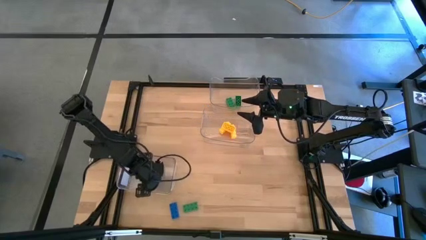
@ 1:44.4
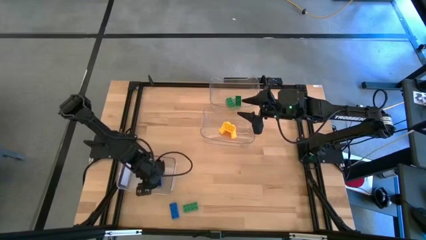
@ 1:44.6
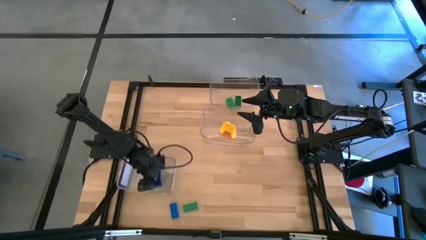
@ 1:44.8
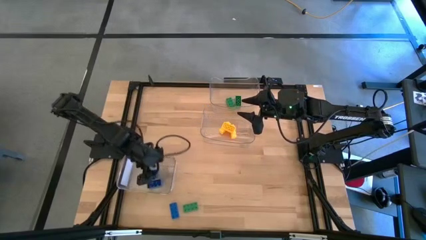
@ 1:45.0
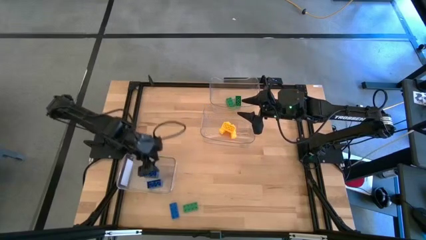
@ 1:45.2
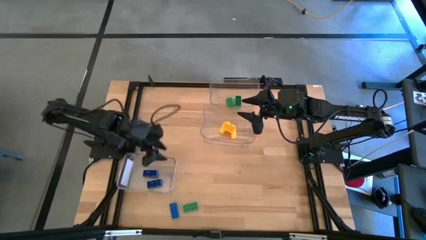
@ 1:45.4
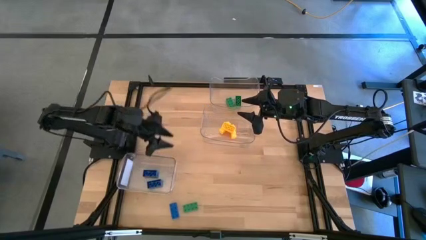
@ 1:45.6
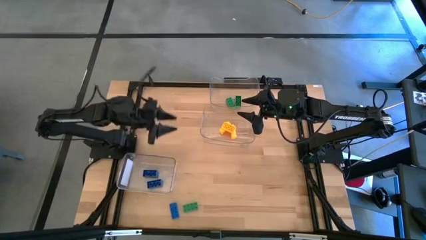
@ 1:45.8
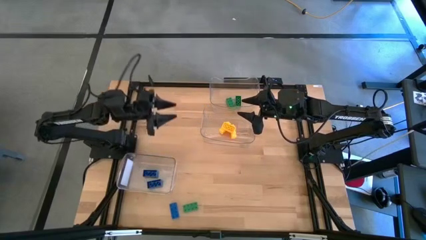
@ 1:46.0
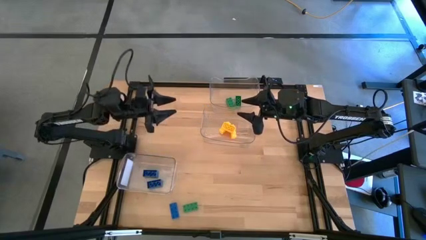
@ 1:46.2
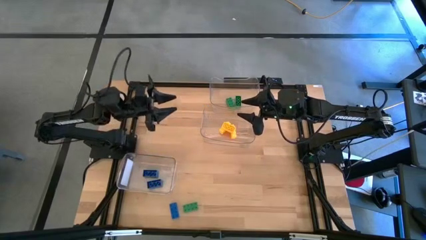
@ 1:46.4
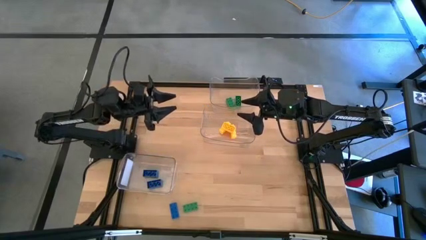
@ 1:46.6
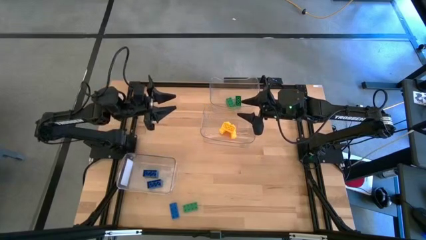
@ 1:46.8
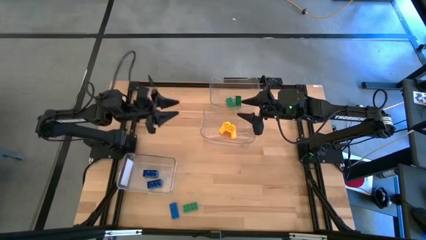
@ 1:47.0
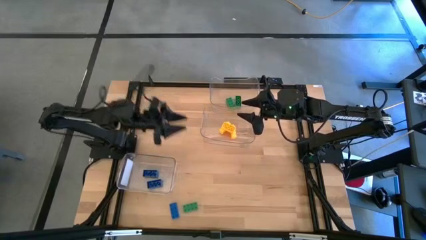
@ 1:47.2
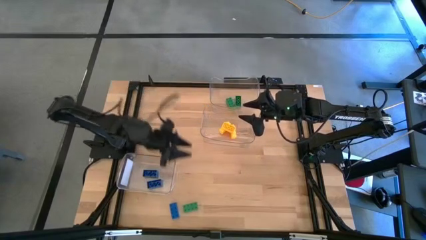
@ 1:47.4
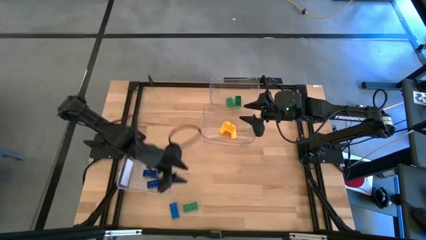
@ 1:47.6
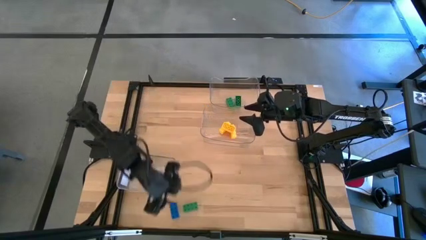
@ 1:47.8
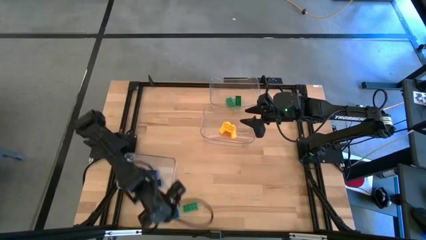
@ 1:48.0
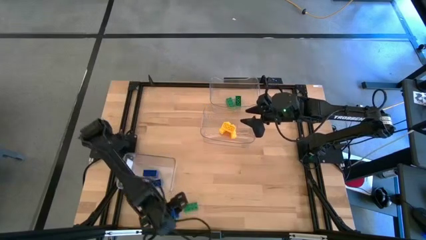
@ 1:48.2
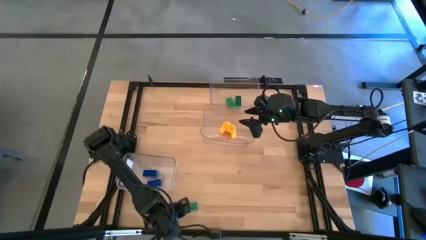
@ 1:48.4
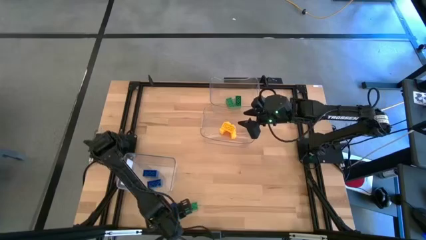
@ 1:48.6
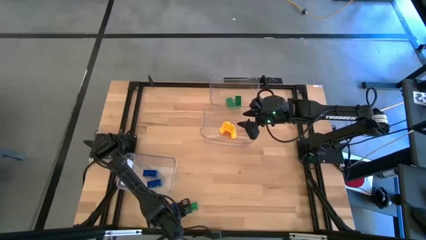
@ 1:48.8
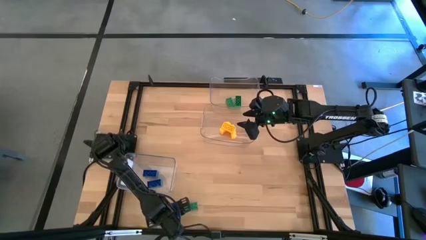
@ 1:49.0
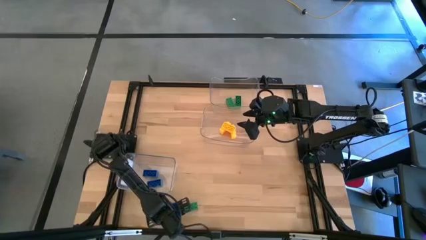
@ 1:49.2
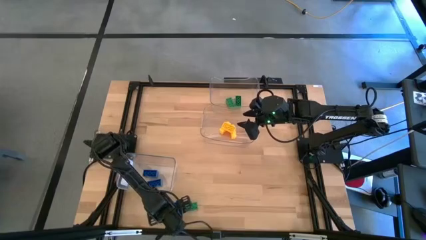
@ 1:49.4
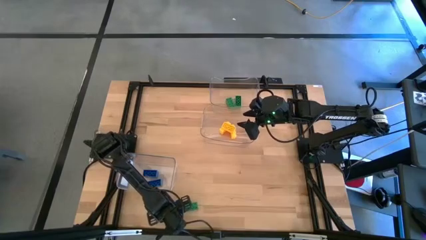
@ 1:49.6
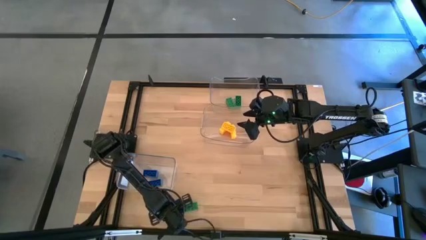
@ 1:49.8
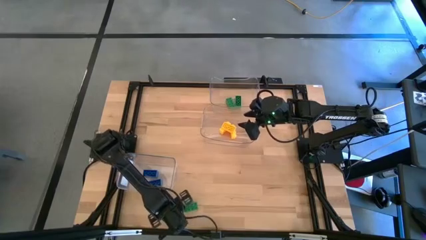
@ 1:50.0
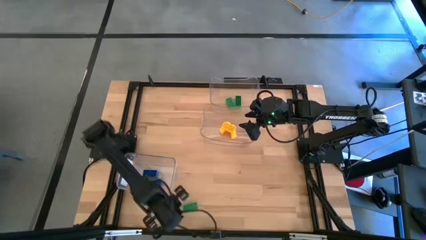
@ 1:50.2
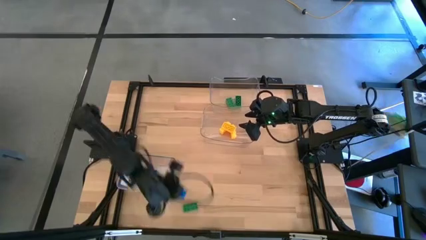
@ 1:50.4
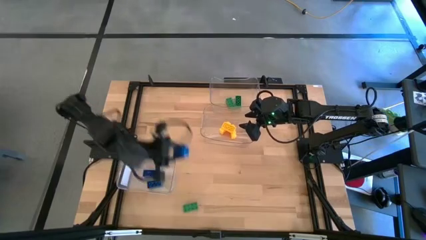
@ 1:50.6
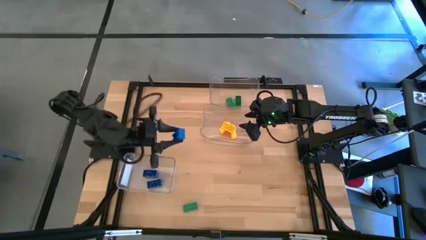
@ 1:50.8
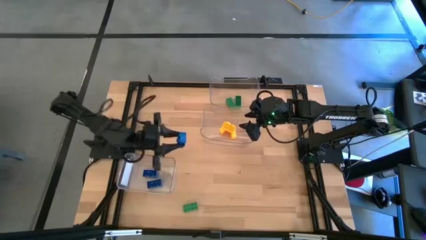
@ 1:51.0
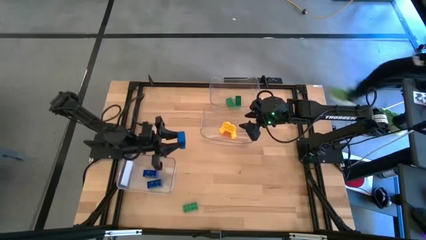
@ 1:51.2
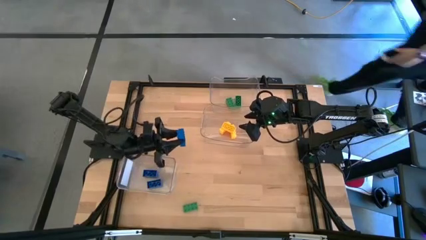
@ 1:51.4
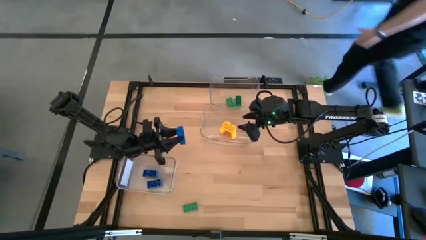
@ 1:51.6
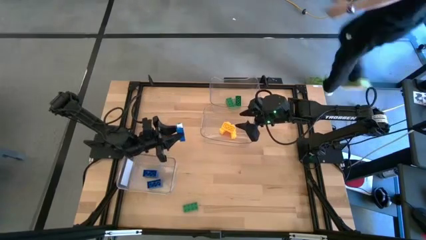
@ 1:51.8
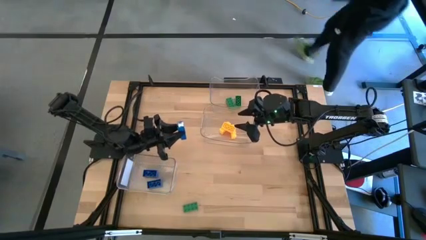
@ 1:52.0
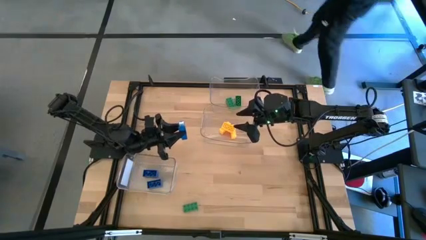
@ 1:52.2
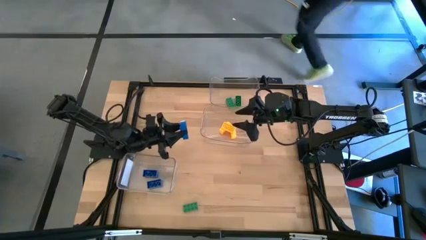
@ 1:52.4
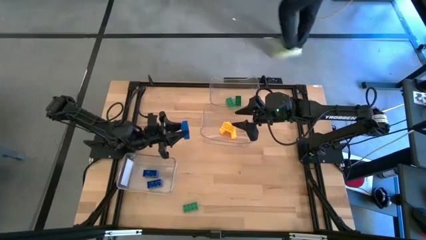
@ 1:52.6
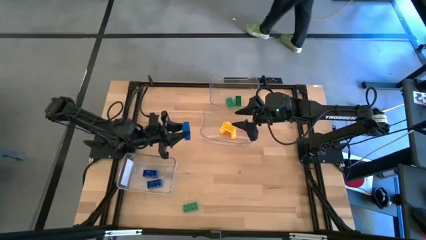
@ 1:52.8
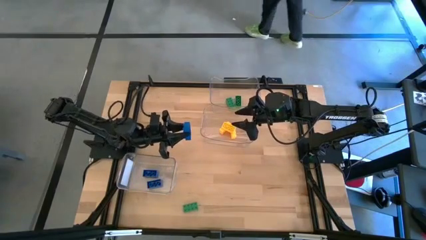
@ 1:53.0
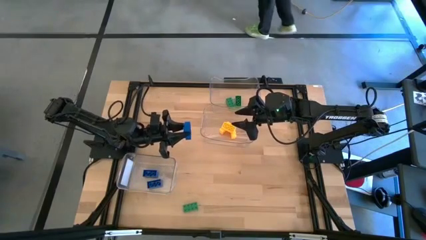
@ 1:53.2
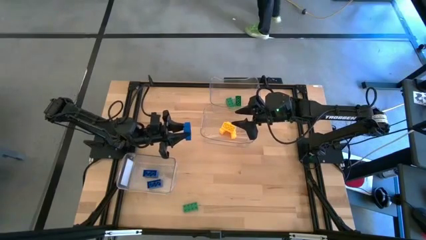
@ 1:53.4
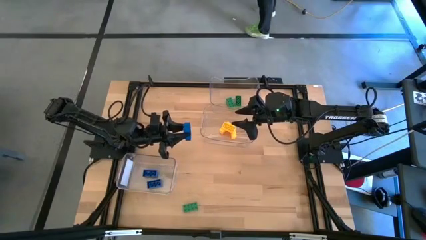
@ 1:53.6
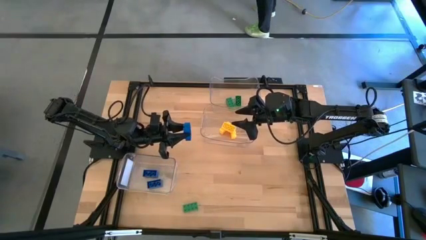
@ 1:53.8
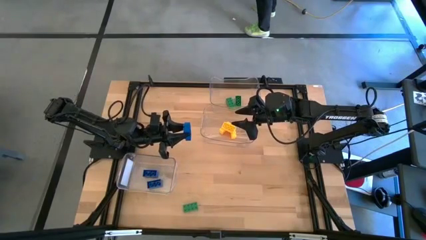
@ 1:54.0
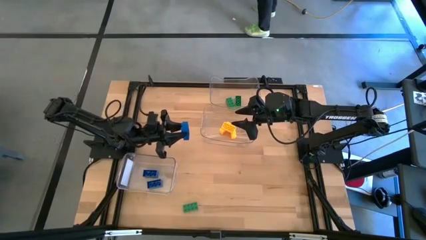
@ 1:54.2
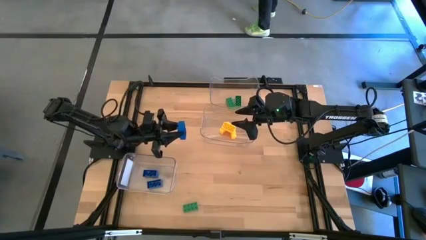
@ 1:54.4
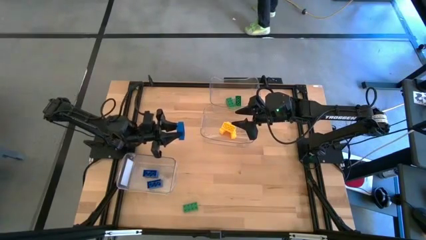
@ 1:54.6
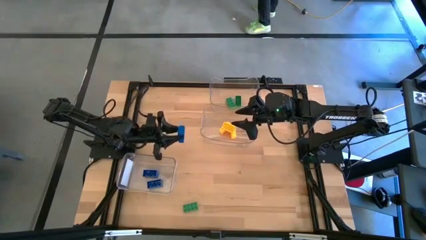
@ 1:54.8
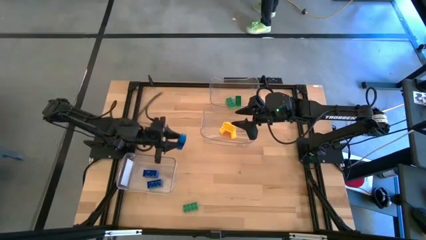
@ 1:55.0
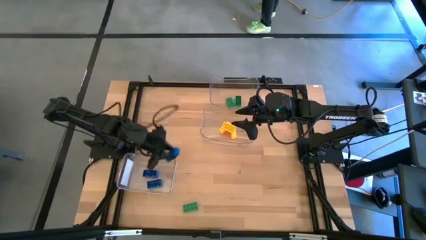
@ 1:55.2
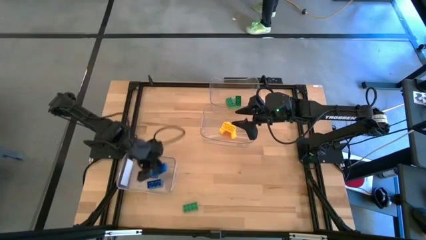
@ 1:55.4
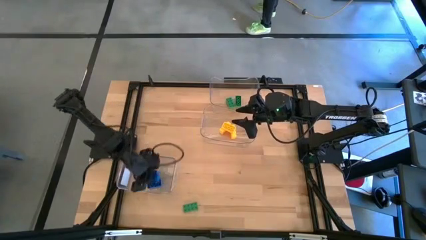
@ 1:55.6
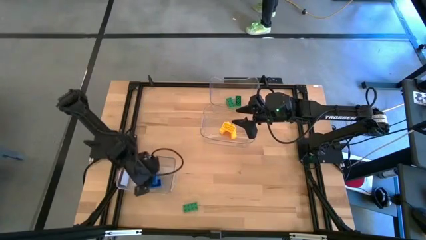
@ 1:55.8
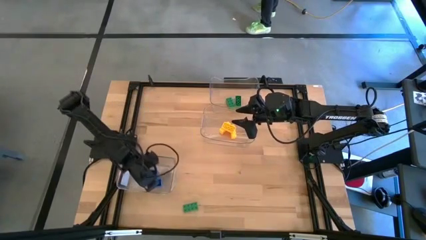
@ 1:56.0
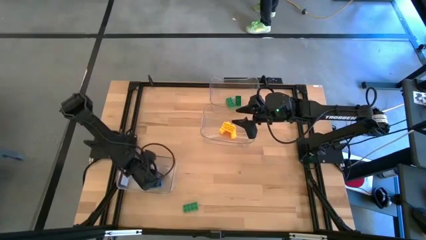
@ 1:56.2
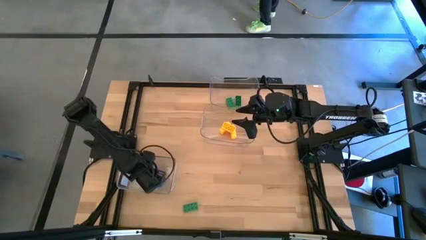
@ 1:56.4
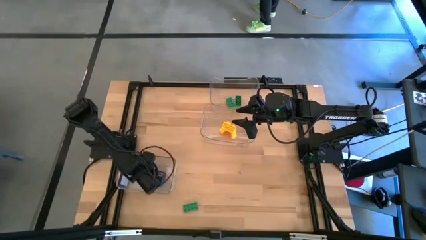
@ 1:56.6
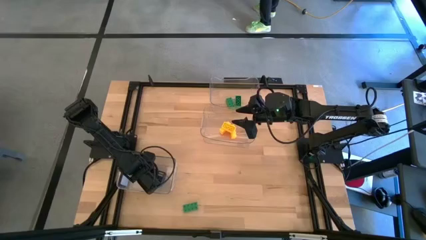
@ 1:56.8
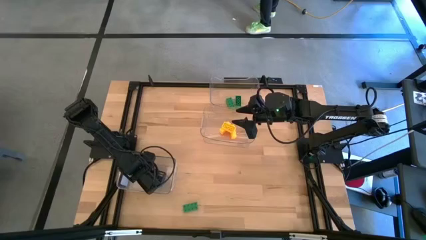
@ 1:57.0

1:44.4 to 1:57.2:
Task: Sort & place blocks by color
Put the blue game piece into the bottom bottom transparent bin
